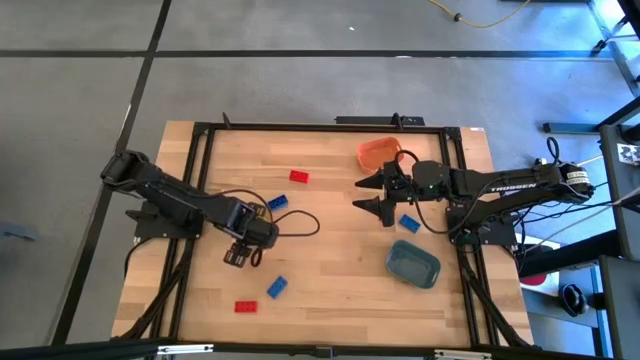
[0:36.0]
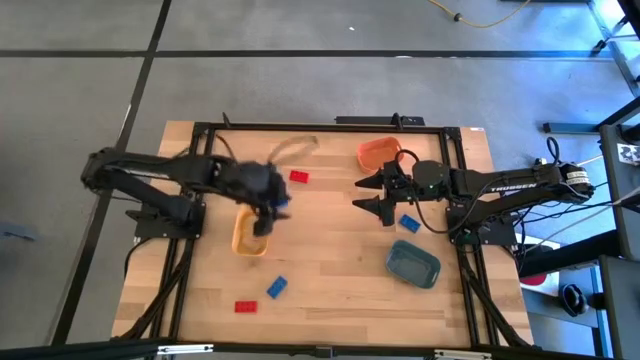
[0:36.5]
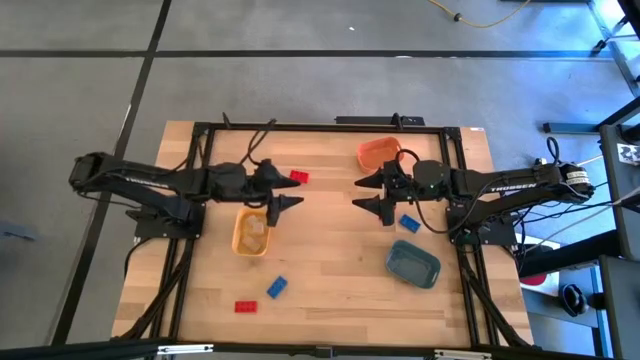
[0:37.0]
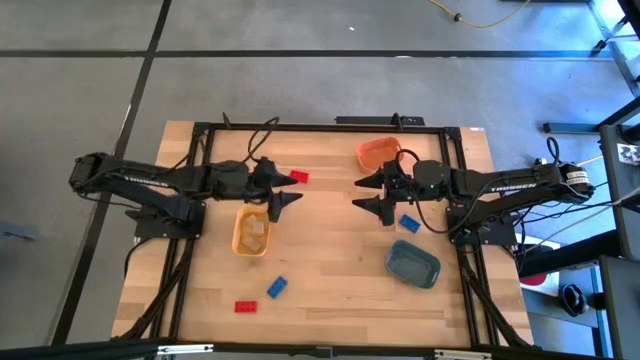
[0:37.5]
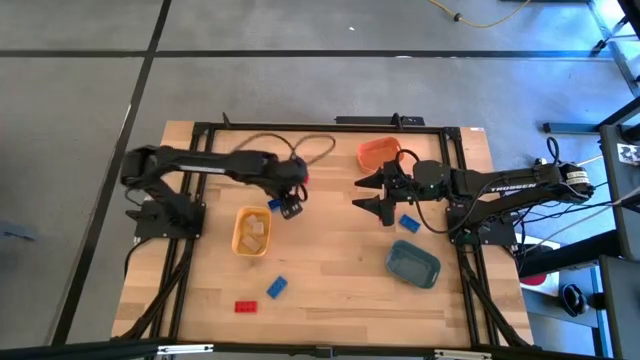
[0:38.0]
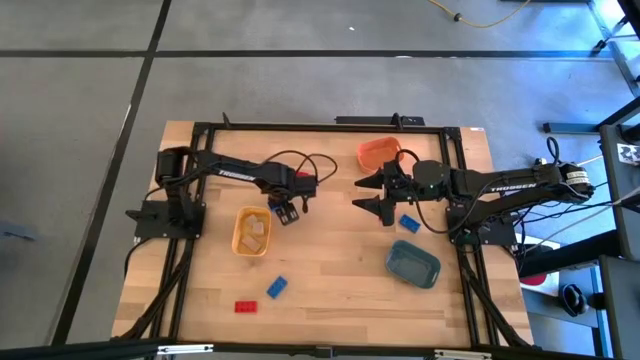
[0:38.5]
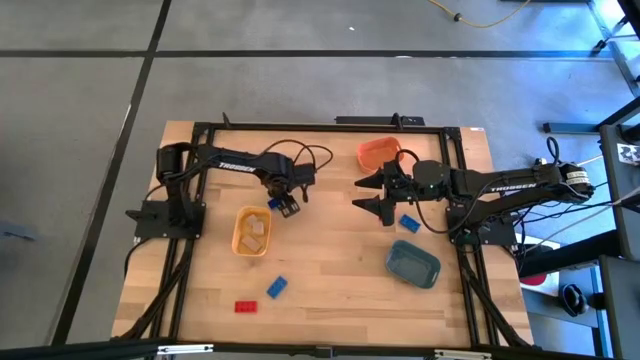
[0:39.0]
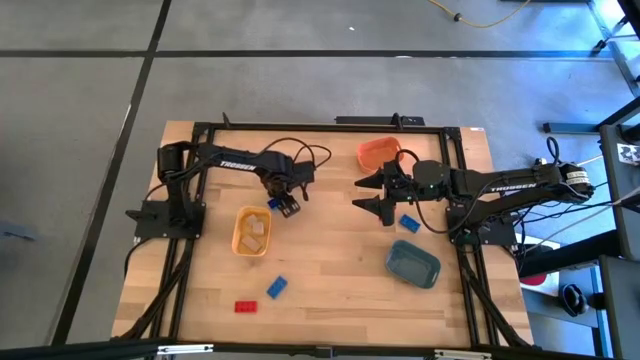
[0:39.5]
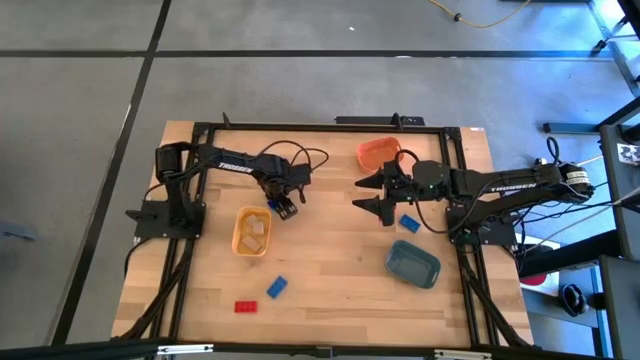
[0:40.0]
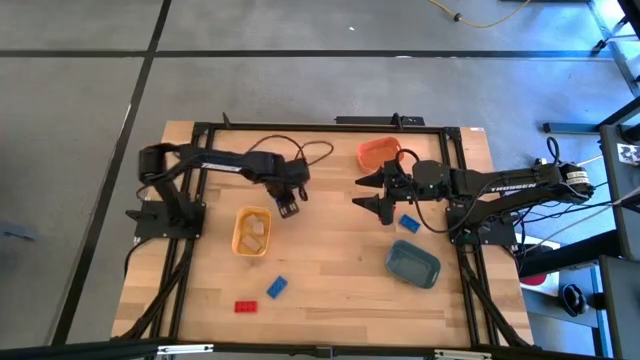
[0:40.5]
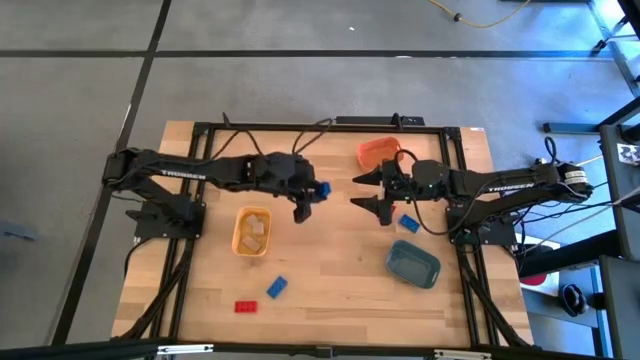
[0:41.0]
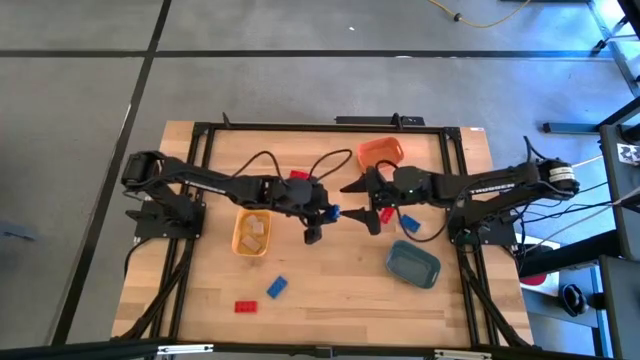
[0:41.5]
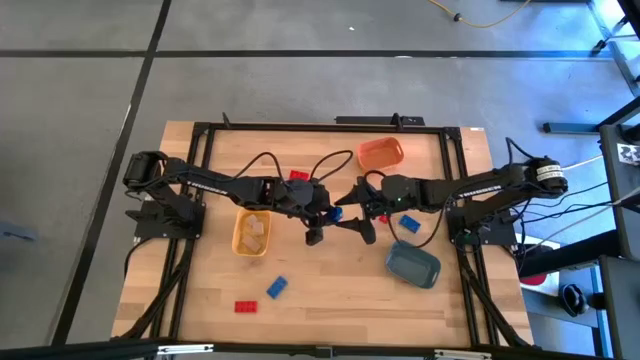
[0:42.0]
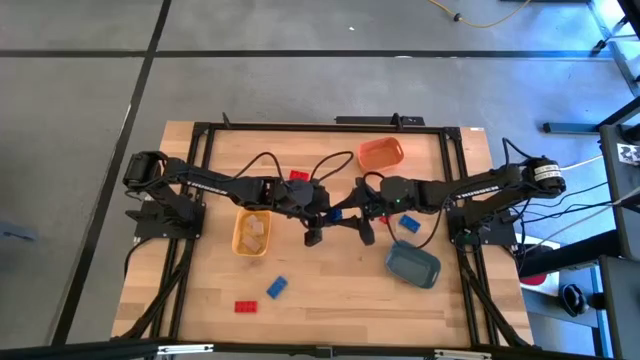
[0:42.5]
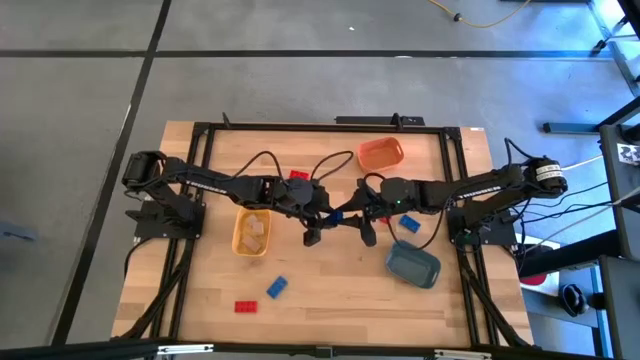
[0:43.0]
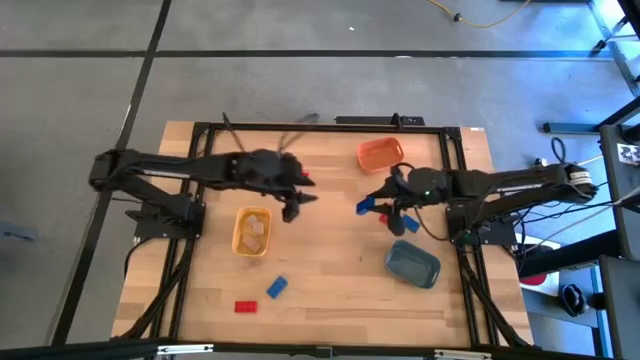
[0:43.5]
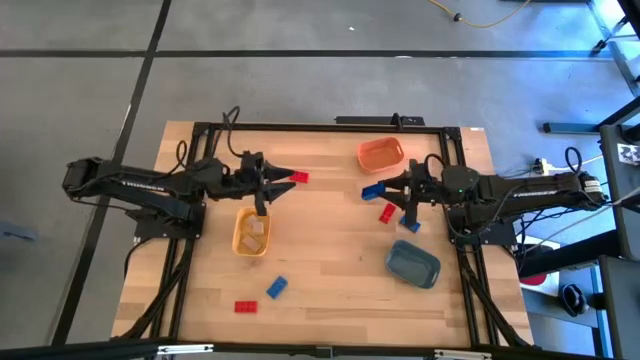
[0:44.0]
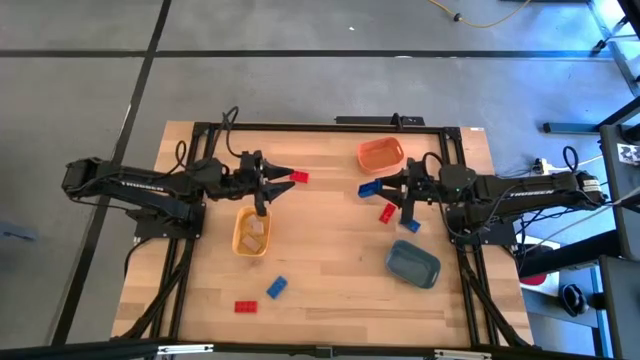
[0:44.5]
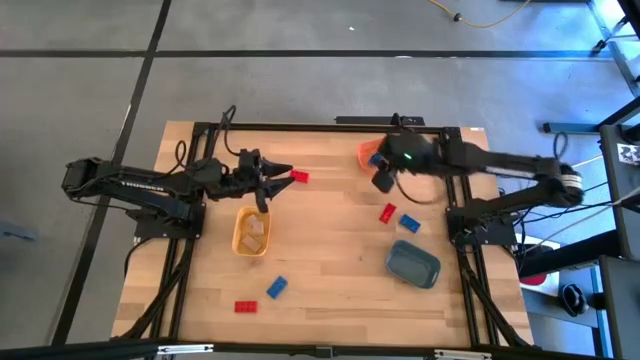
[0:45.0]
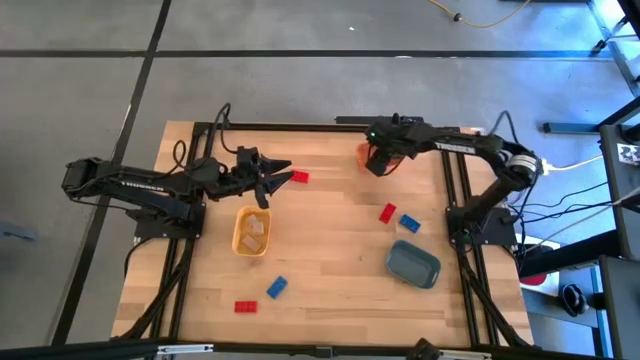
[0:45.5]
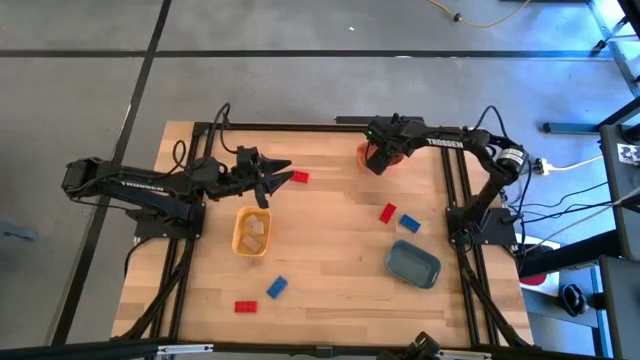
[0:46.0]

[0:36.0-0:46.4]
Task: Sort & place blocks by color
Put the top left blue game piece into the orange bin

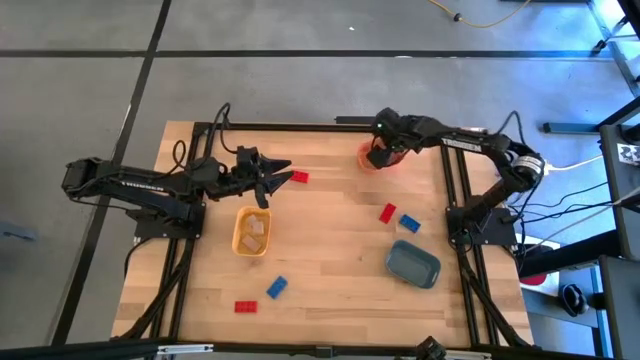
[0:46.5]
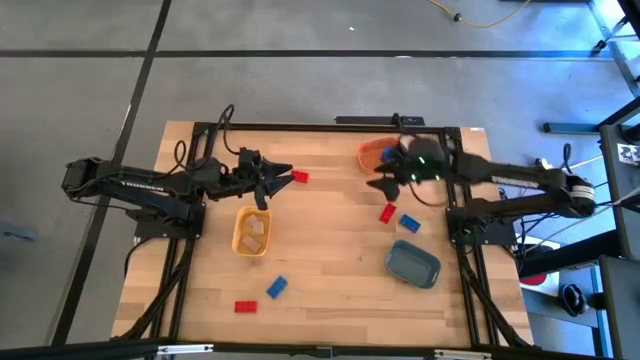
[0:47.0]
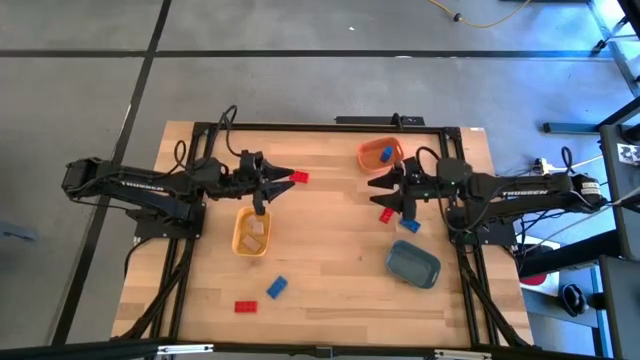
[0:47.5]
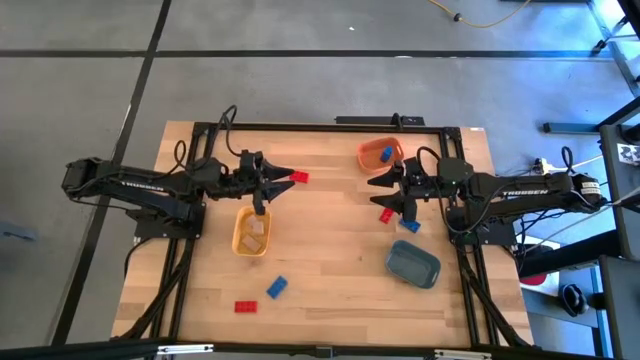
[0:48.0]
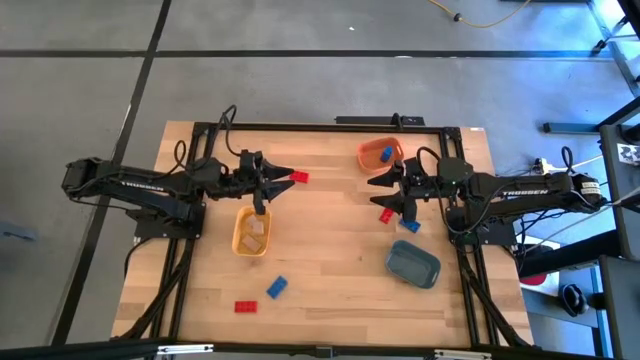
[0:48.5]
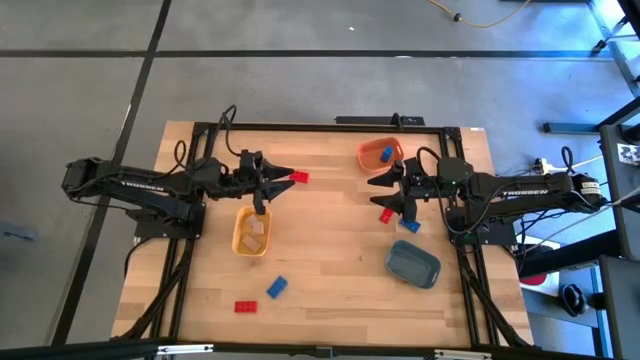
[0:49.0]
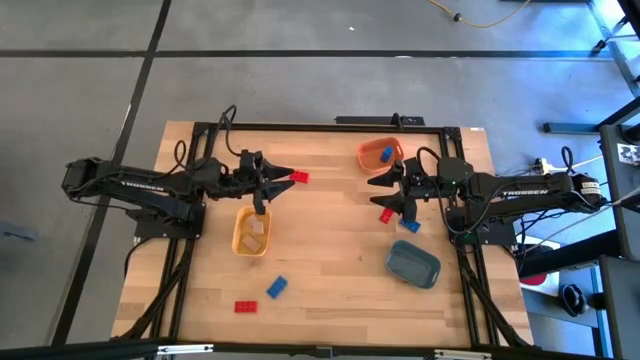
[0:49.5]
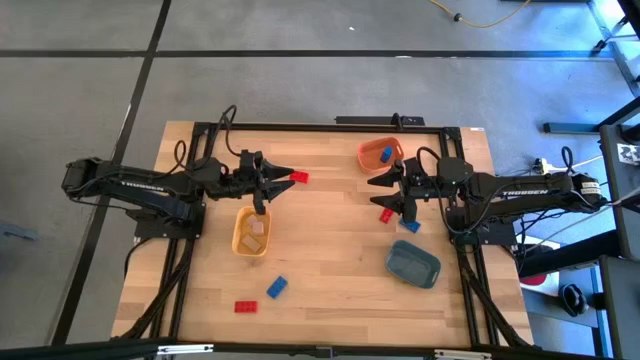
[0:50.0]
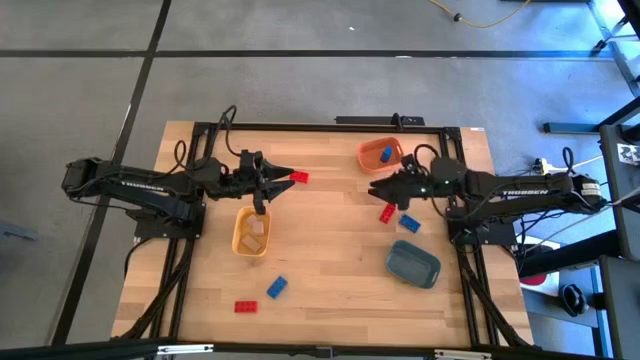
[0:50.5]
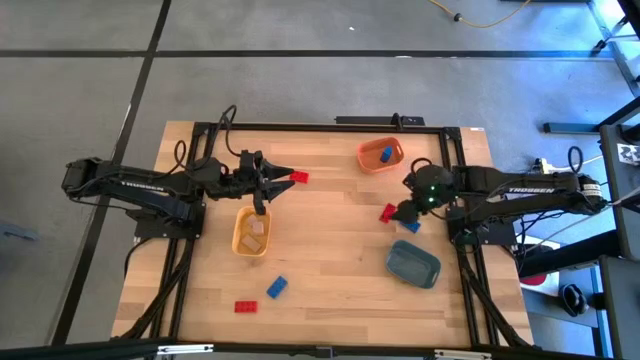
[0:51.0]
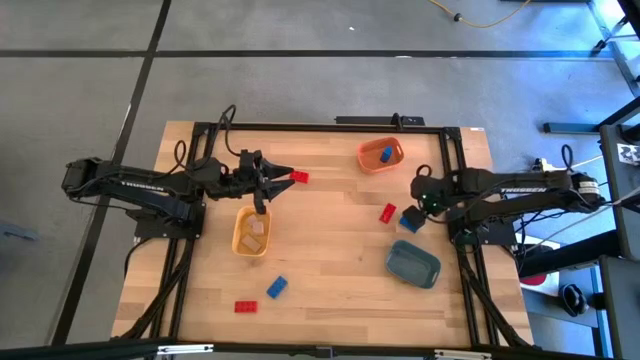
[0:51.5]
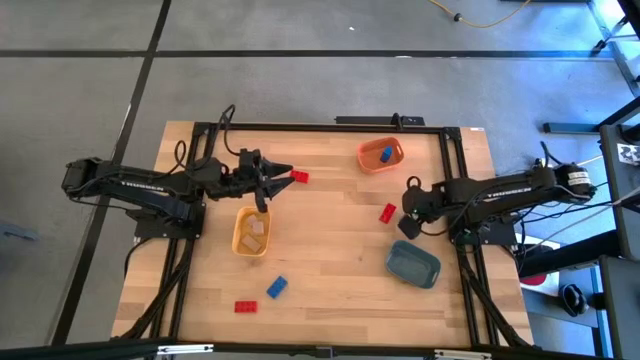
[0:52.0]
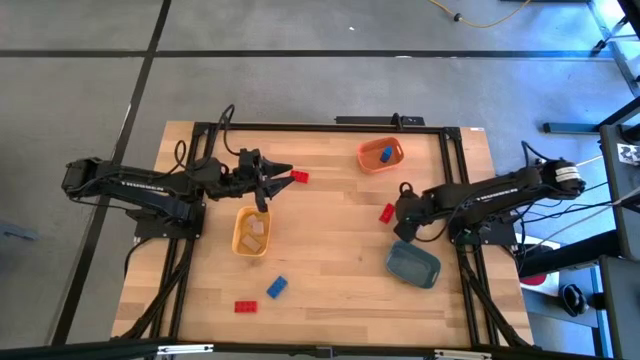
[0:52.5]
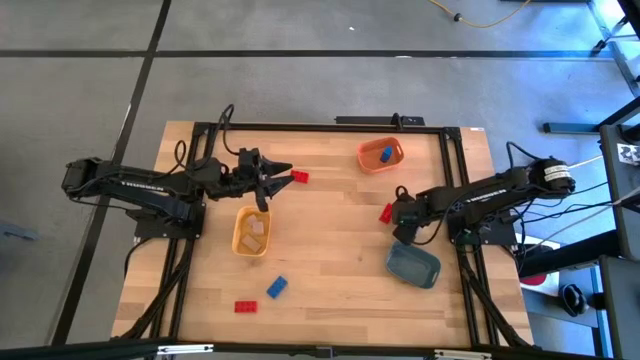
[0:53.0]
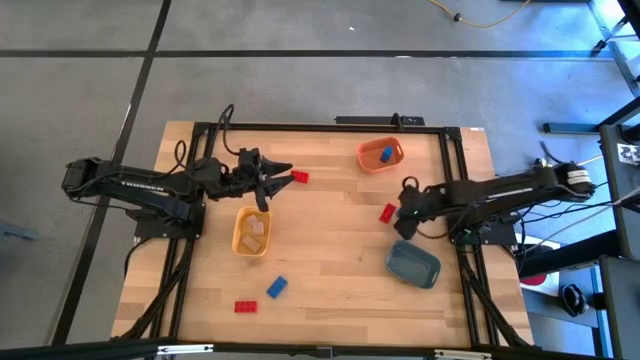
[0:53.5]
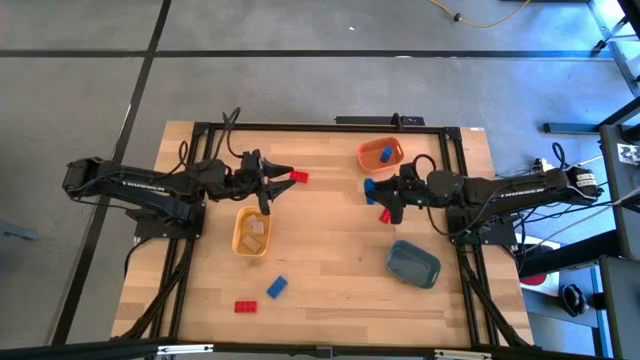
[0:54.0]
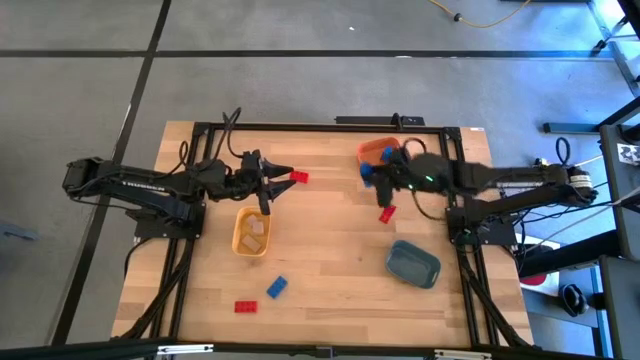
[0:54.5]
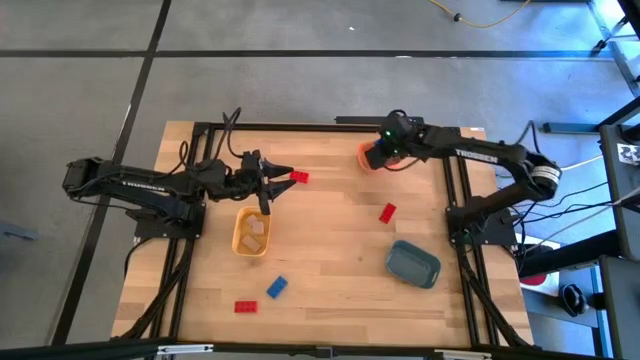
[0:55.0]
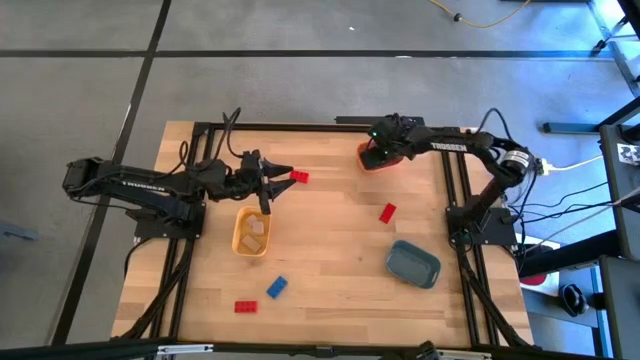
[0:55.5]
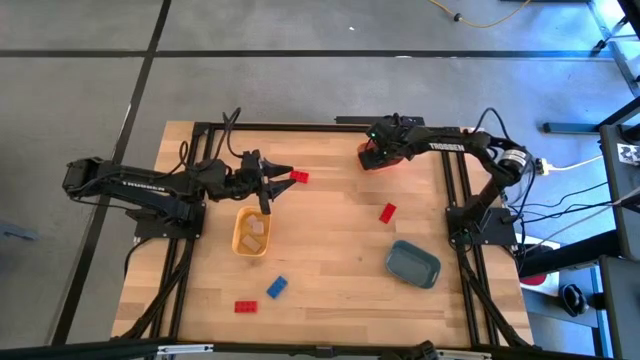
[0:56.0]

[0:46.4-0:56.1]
Put the top blue game piece into the orange bin

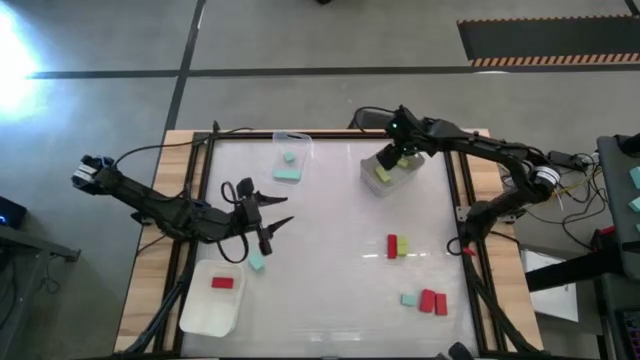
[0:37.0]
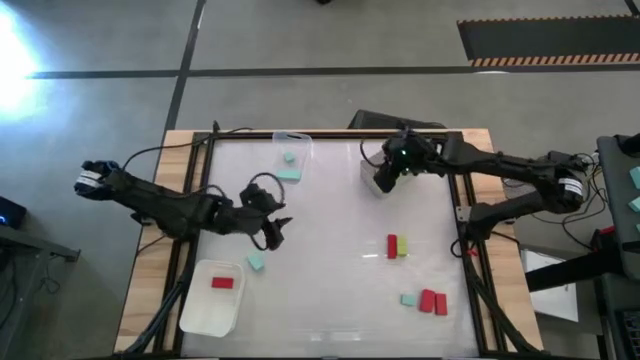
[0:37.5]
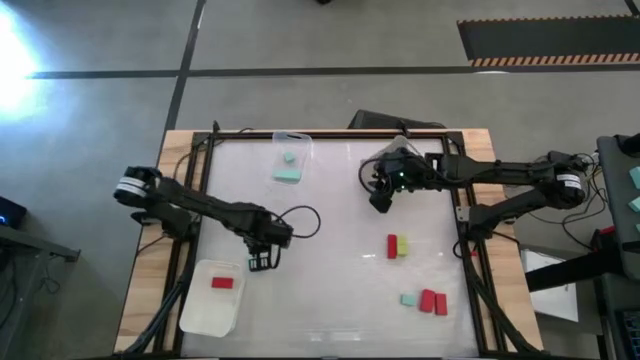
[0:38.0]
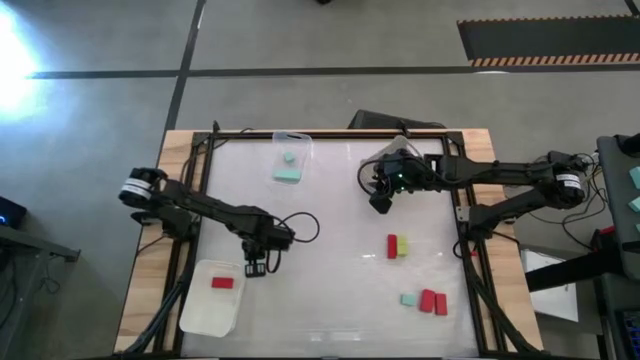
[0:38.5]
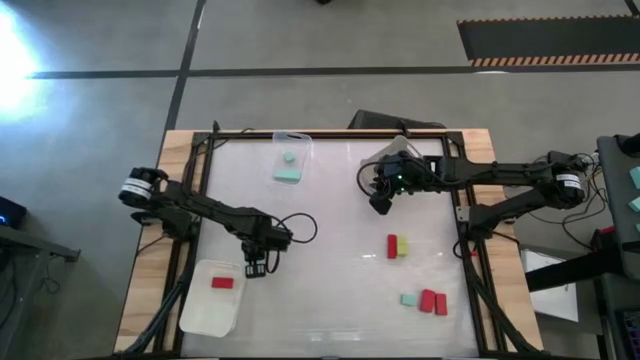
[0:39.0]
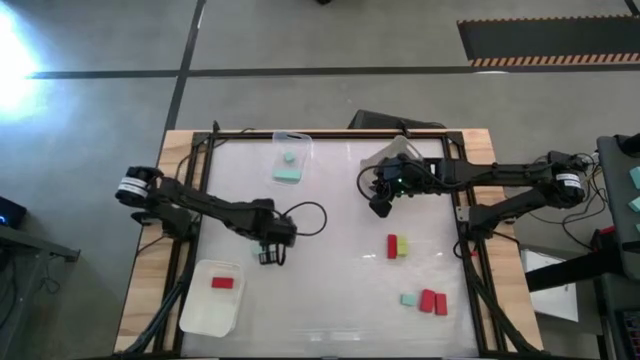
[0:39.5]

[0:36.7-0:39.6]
Task: Sort & place blocks by color
Put the light blue block into the transparent bin
